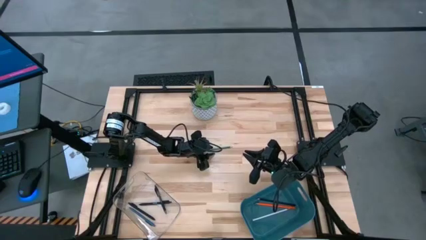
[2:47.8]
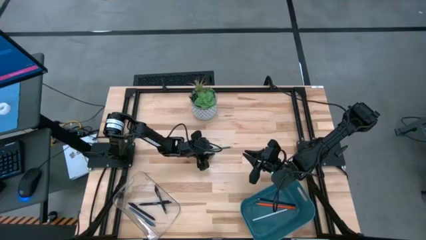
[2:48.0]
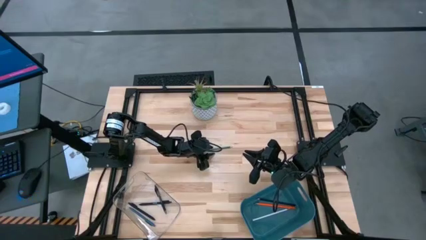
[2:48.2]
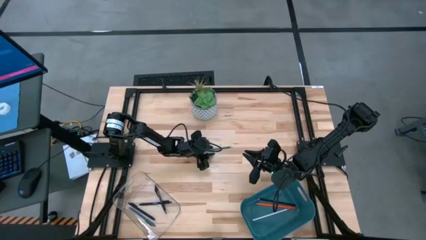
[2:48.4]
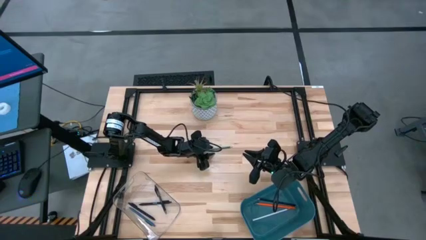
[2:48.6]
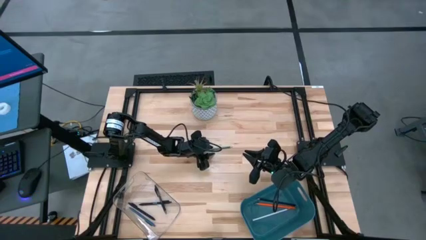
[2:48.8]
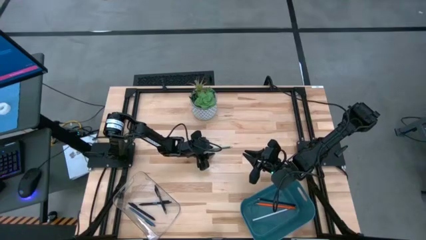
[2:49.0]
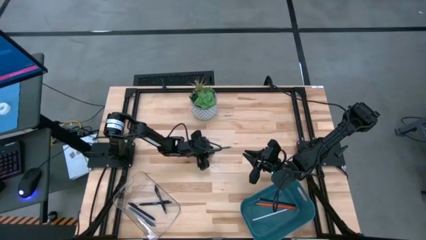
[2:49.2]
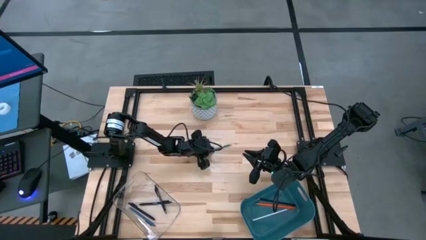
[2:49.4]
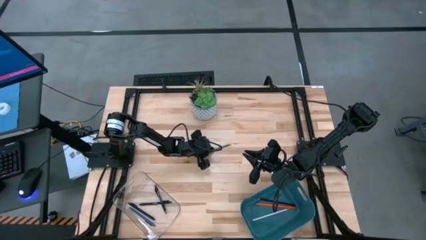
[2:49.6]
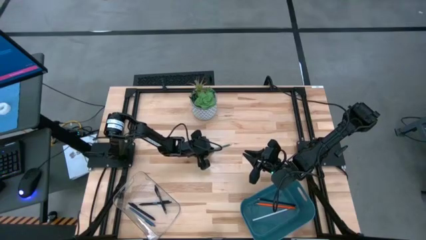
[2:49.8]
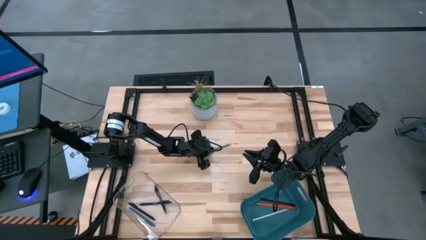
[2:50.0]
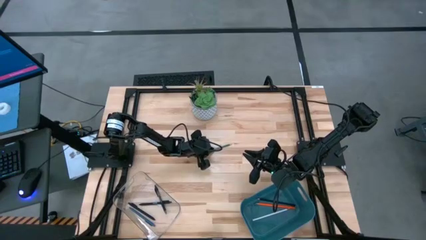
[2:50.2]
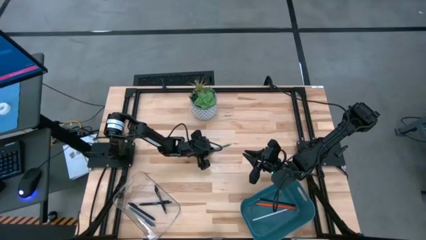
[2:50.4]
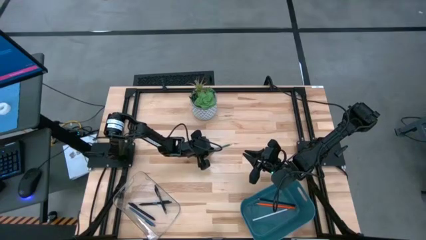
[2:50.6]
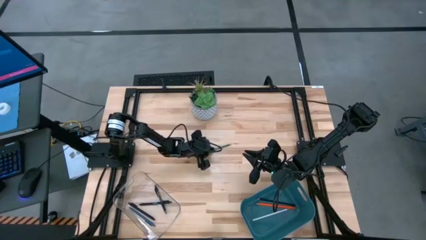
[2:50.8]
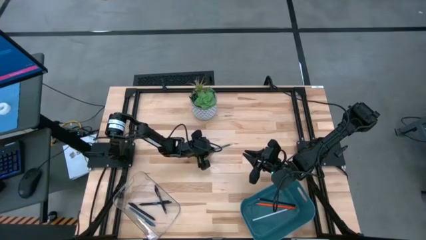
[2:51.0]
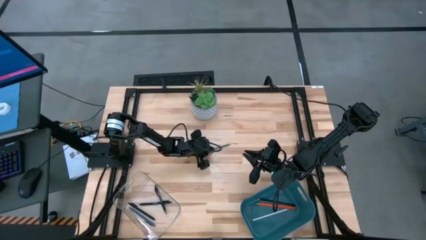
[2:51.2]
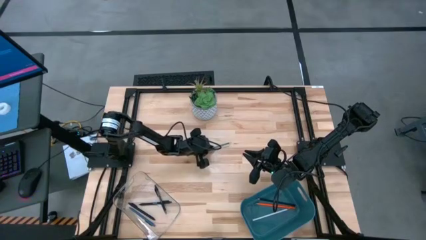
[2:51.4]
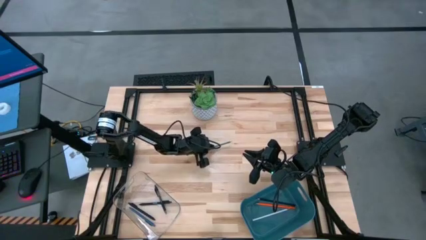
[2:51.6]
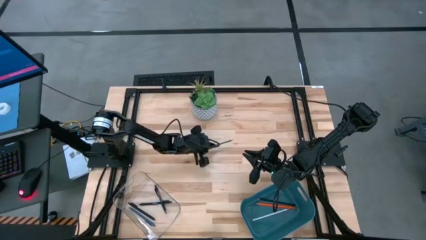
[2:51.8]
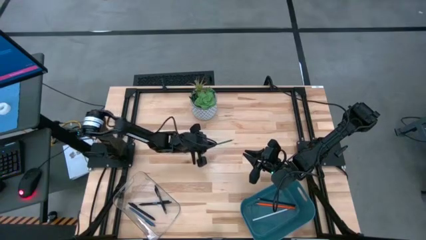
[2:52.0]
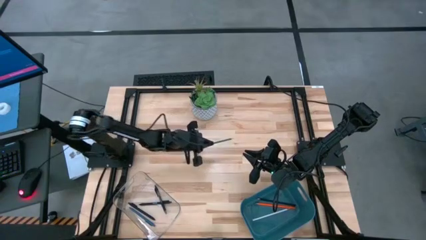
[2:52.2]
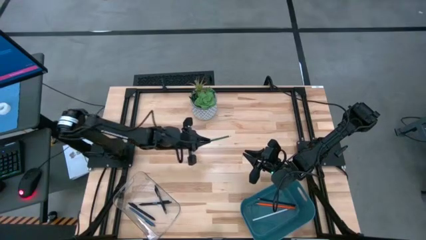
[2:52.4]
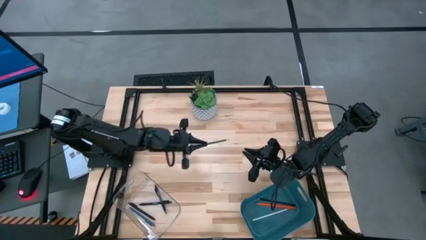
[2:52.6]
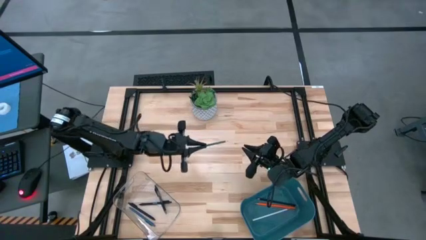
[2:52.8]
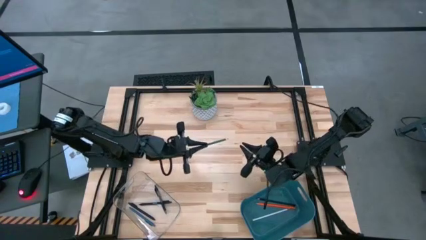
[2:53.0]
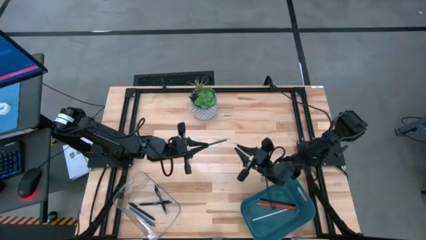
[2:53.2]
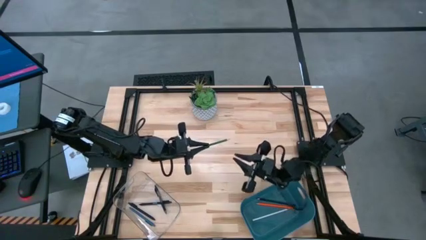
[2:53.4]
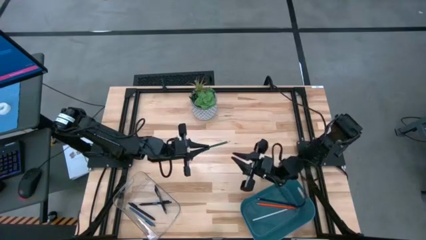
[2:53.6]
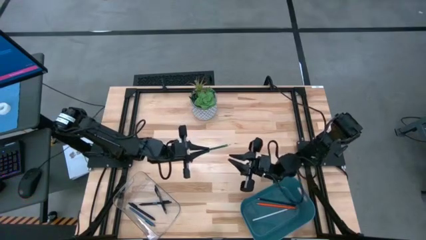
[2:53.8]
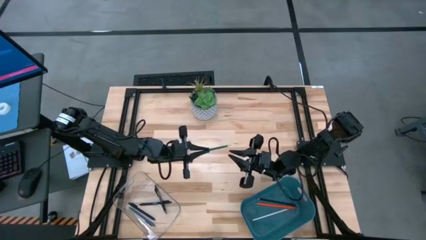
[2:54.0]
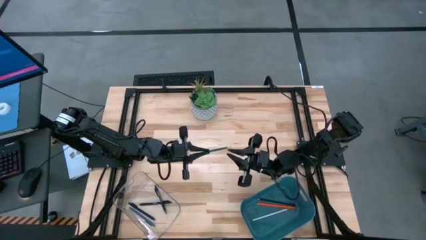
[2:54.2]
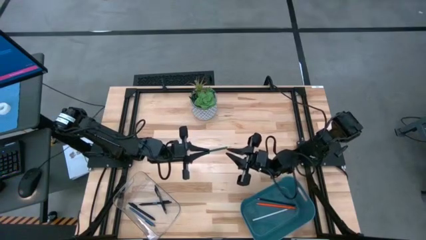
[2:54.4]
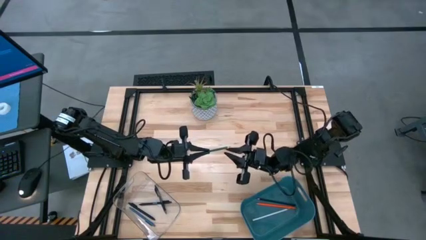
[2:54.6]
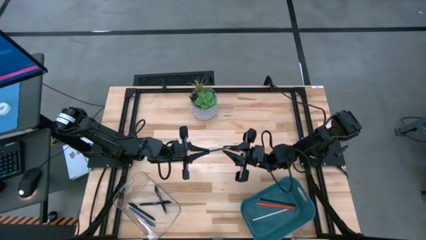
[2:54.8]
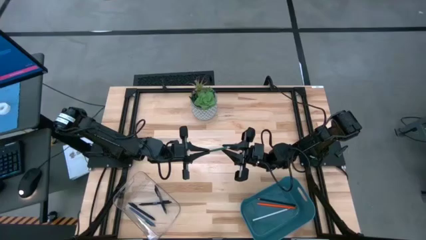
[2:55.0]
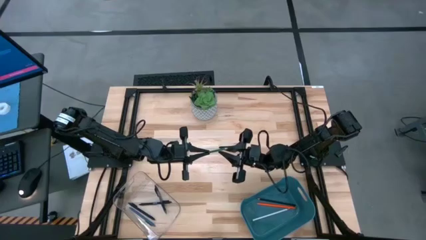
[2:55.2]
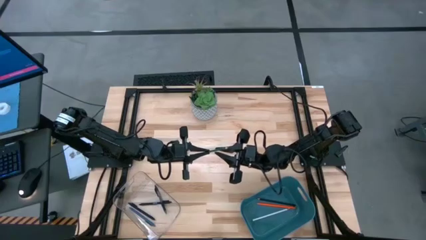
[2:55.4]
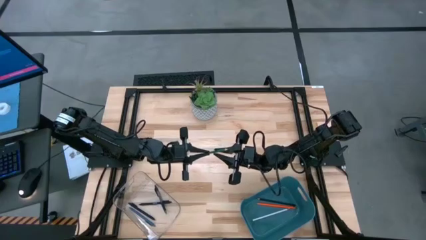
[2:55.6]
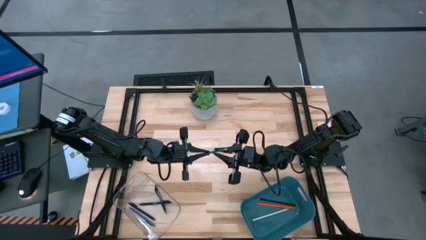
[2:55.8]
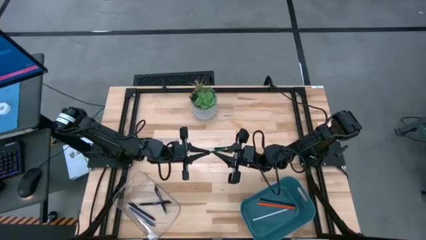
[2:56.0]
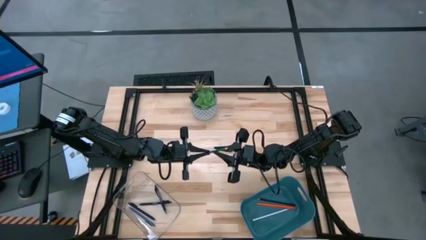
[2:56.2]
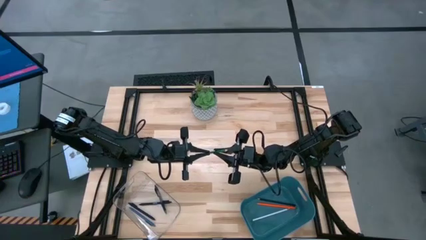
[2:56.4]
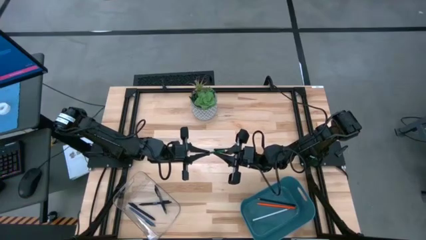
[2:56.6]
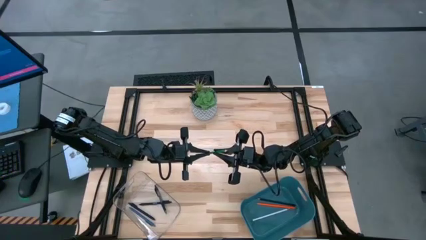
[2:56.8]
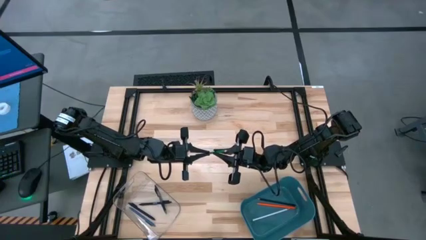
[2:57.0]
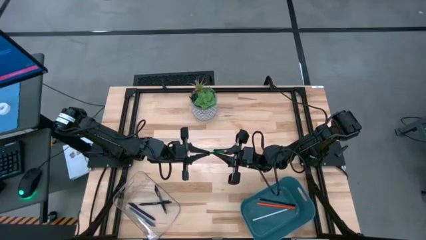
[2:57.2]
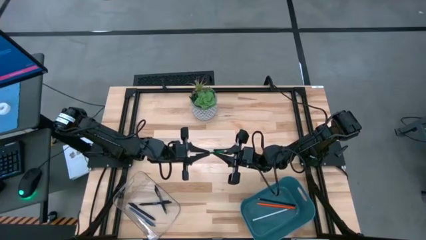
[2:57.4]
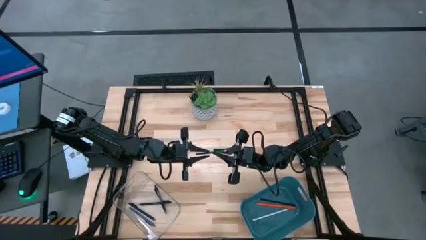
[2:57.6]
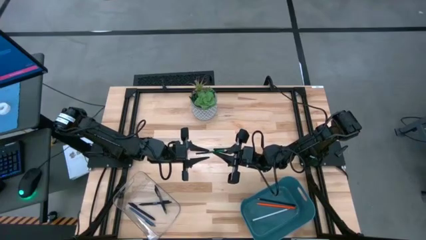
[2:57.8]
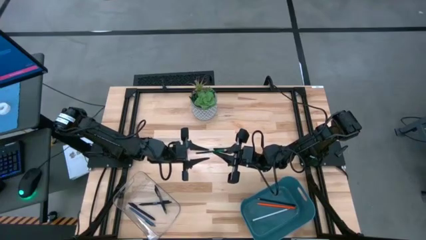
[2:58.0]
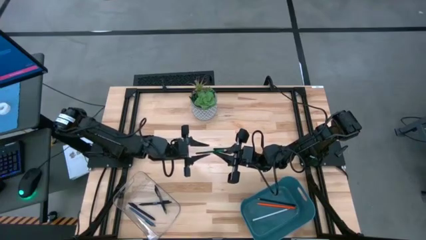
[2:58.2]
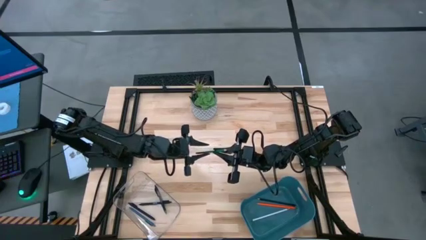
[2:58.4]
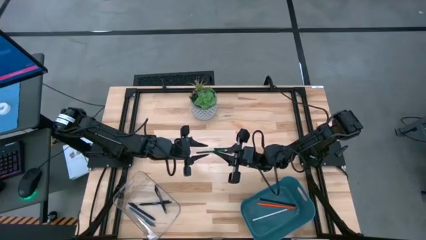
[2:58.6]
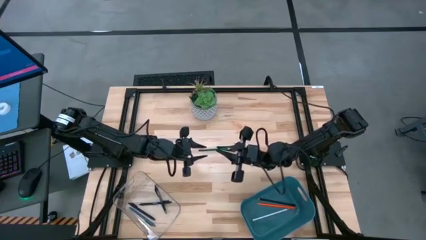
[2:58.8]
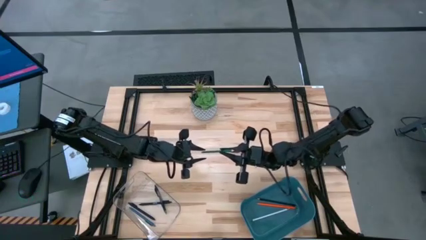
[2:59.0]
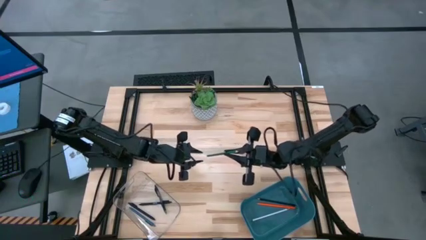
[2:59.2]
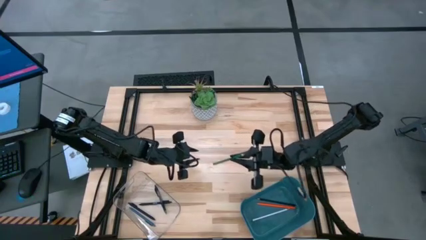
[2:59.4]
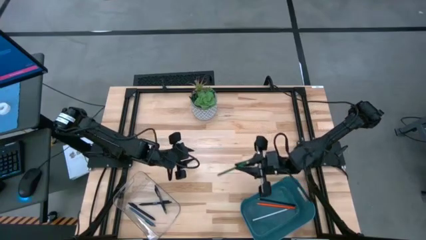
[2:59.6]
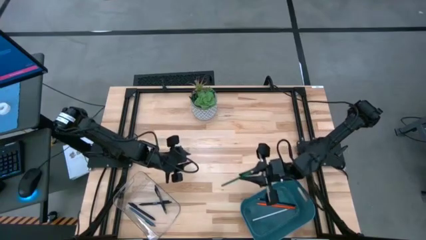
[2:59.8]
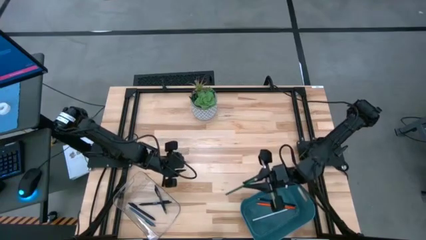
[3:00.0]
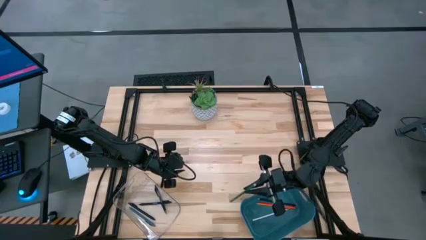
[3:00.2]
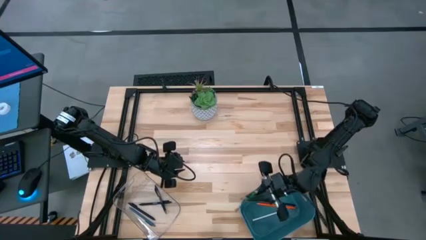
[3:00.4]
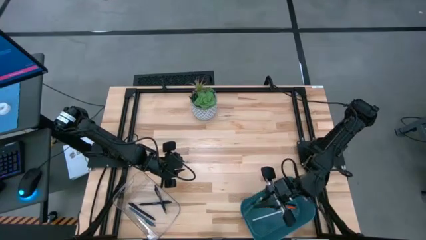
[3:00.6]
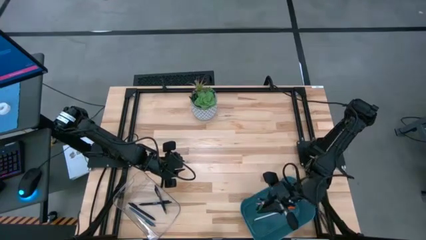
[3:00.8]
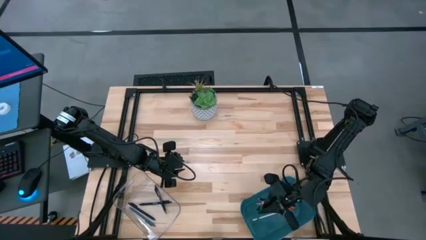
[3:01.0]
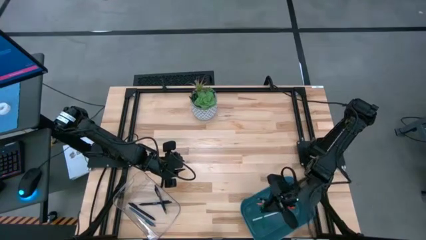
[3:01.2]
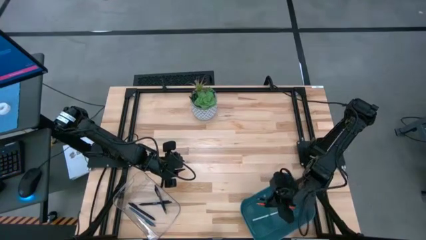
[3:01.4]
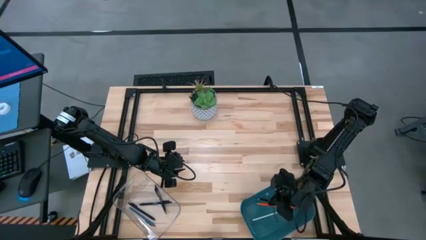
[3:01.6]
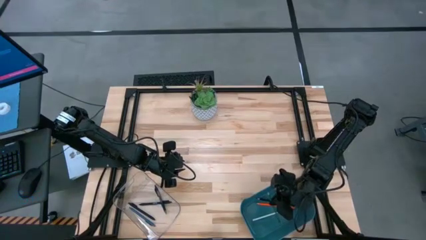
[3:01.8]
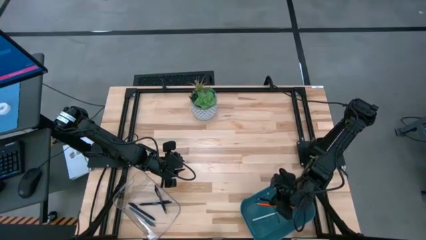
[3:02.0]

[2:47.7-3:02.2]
Task: Sort pens & pencils
Put the green pencil into the blue bin
